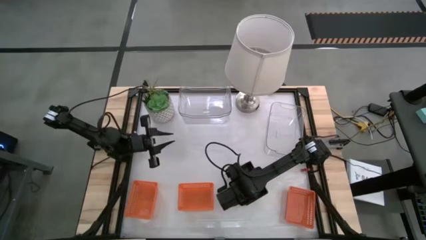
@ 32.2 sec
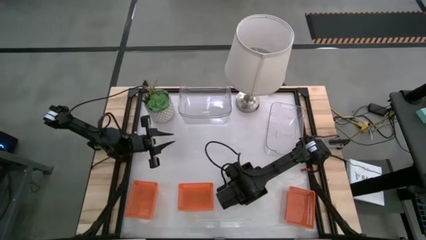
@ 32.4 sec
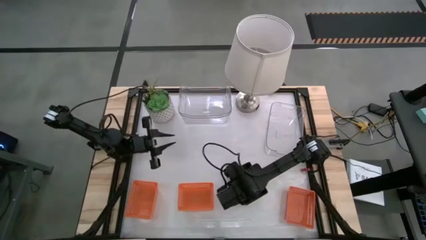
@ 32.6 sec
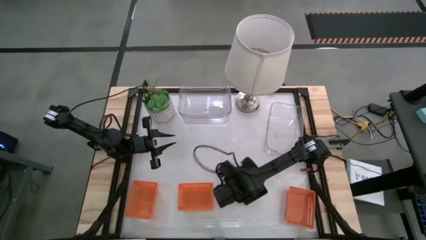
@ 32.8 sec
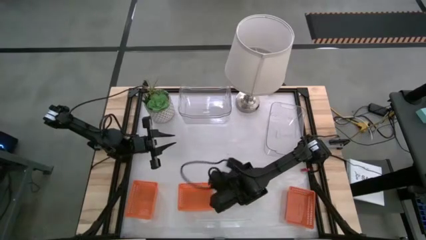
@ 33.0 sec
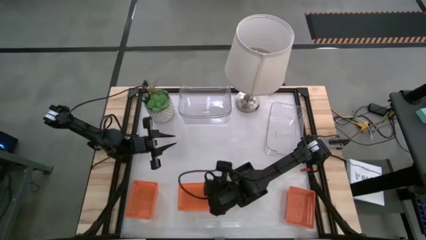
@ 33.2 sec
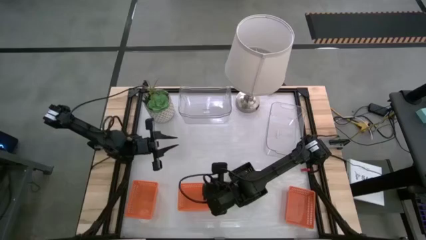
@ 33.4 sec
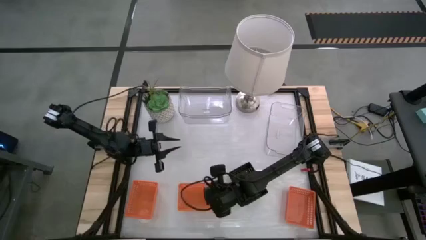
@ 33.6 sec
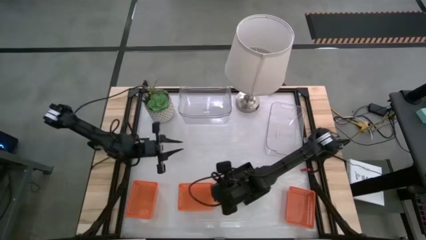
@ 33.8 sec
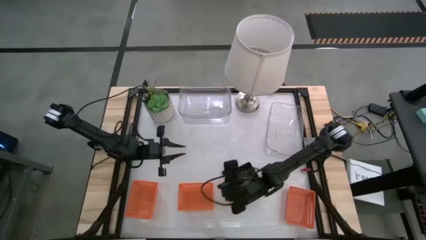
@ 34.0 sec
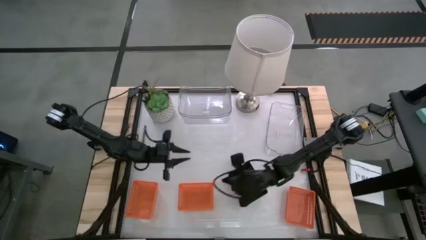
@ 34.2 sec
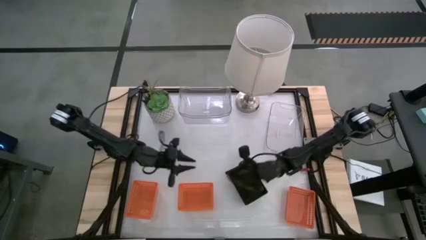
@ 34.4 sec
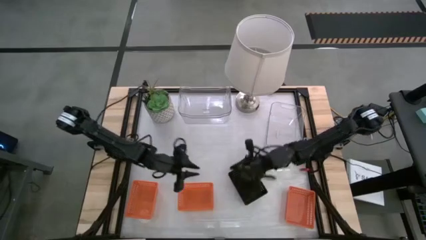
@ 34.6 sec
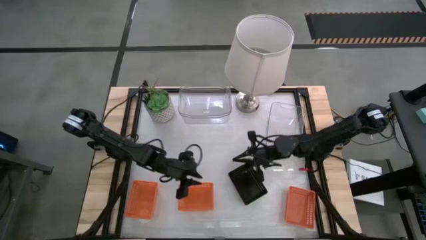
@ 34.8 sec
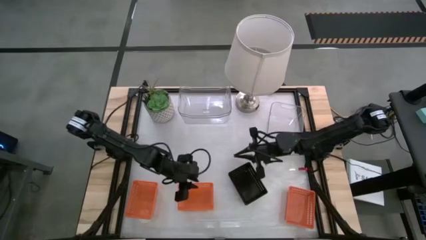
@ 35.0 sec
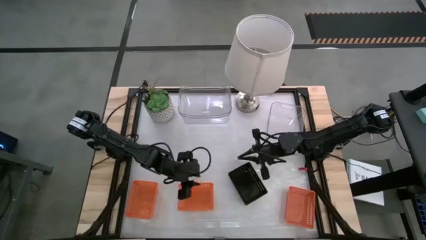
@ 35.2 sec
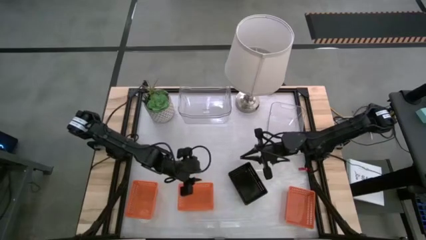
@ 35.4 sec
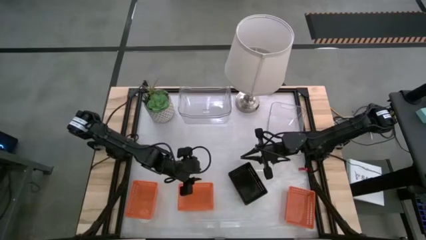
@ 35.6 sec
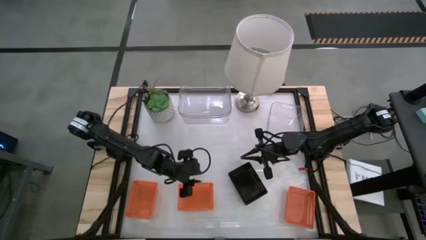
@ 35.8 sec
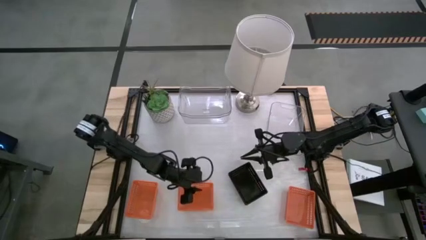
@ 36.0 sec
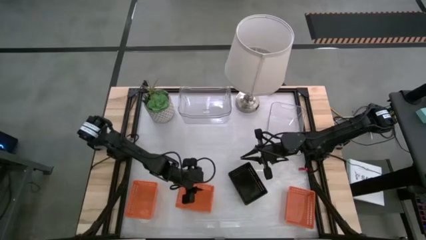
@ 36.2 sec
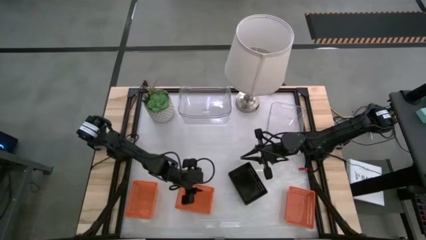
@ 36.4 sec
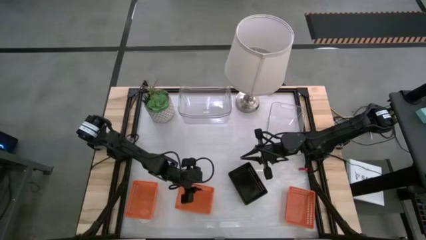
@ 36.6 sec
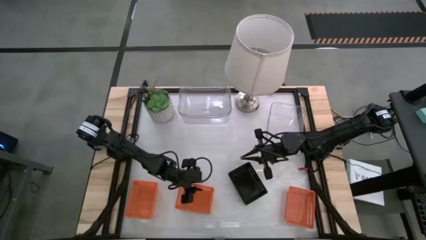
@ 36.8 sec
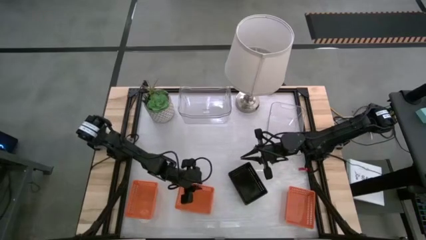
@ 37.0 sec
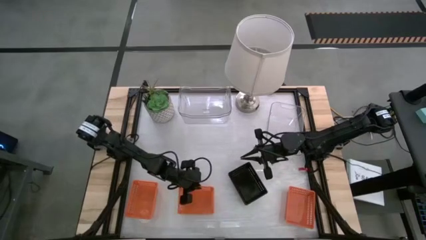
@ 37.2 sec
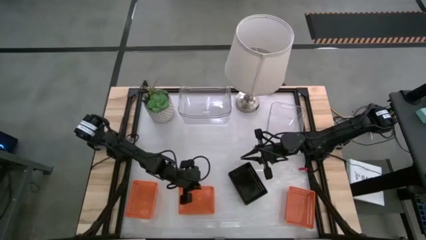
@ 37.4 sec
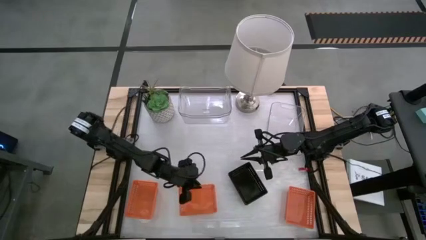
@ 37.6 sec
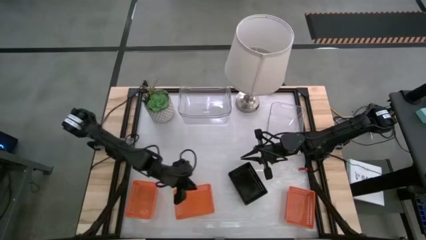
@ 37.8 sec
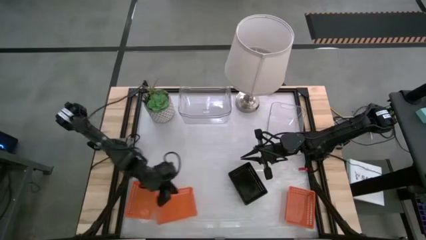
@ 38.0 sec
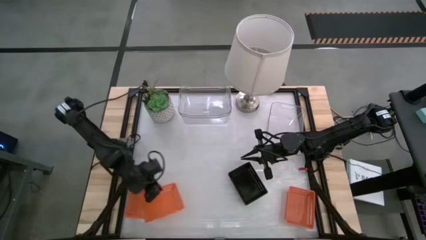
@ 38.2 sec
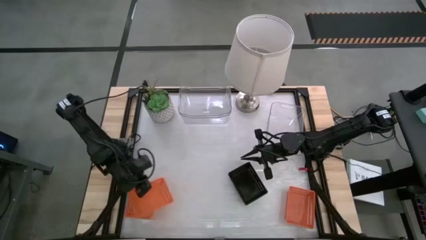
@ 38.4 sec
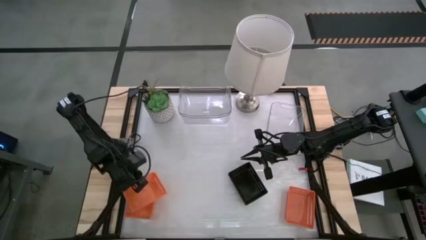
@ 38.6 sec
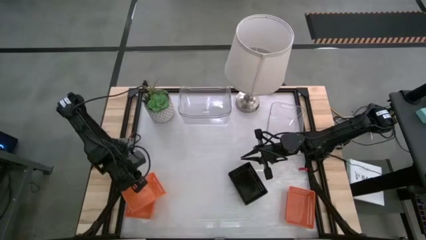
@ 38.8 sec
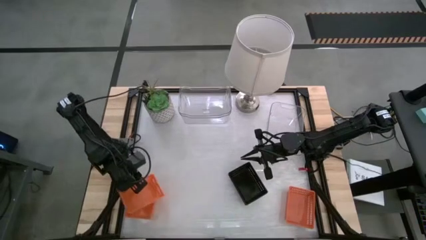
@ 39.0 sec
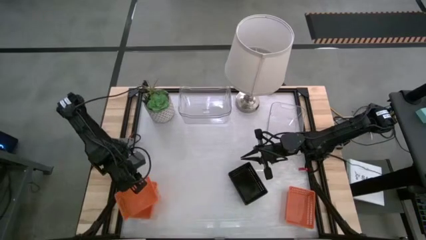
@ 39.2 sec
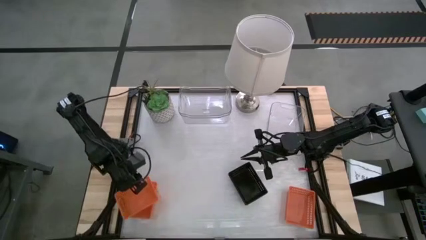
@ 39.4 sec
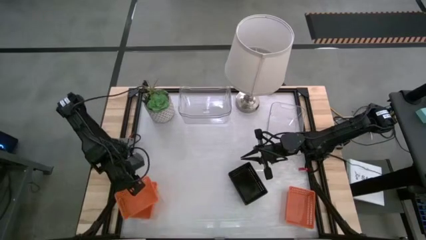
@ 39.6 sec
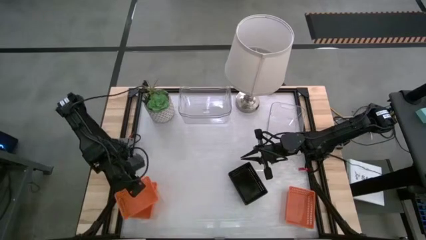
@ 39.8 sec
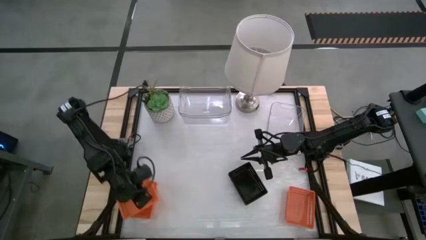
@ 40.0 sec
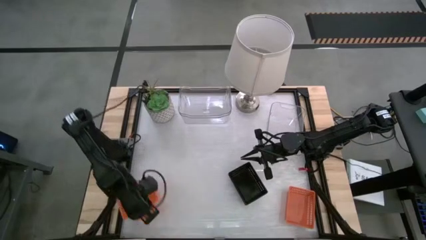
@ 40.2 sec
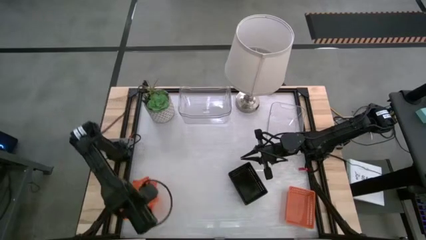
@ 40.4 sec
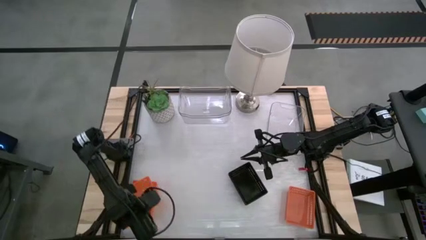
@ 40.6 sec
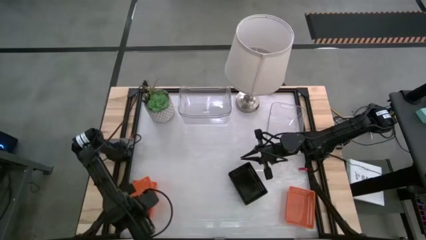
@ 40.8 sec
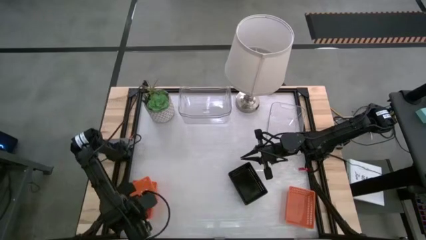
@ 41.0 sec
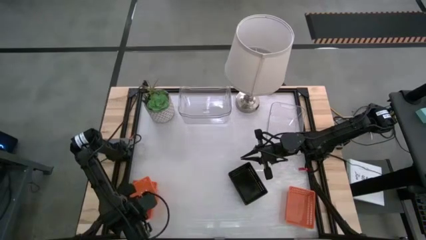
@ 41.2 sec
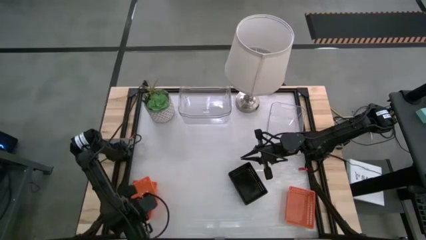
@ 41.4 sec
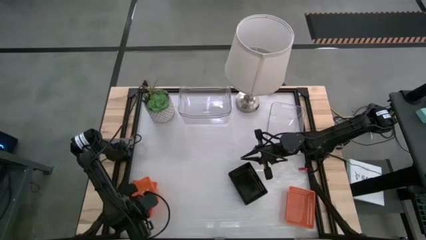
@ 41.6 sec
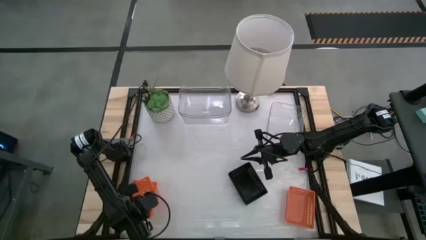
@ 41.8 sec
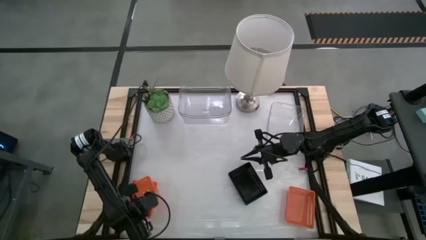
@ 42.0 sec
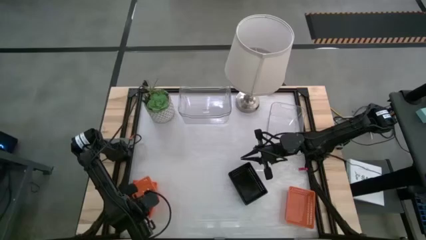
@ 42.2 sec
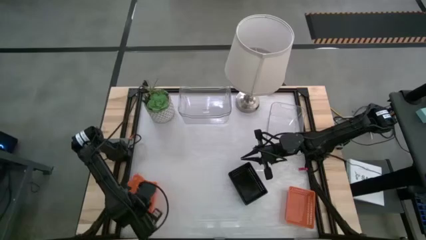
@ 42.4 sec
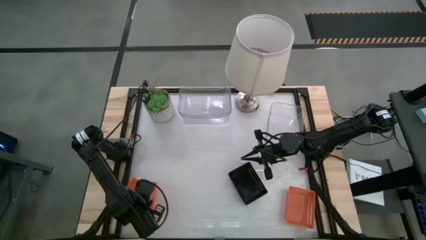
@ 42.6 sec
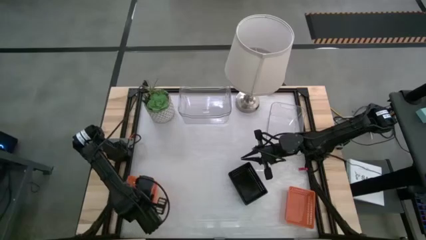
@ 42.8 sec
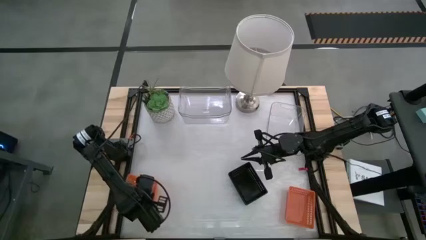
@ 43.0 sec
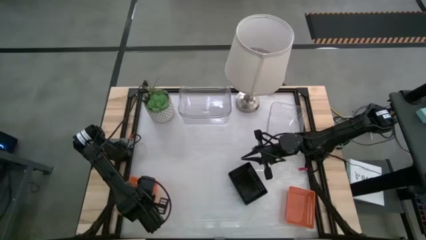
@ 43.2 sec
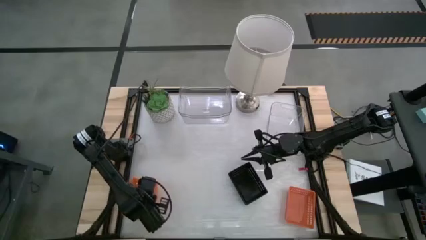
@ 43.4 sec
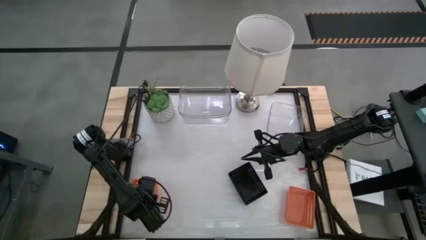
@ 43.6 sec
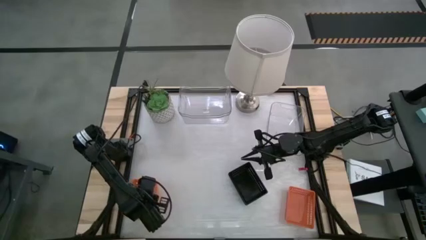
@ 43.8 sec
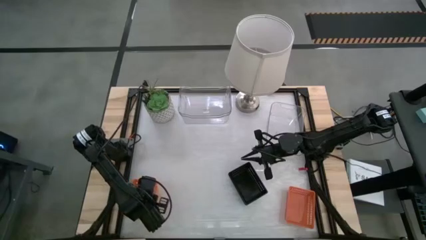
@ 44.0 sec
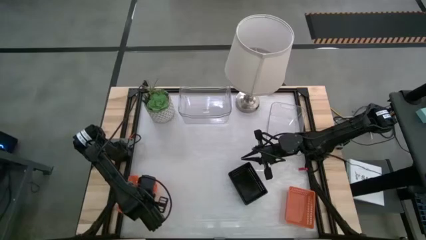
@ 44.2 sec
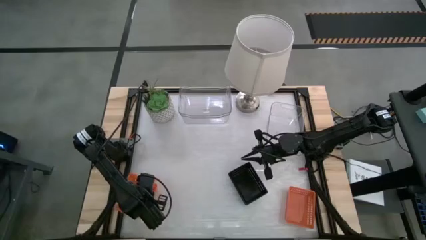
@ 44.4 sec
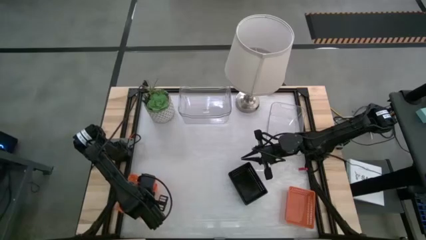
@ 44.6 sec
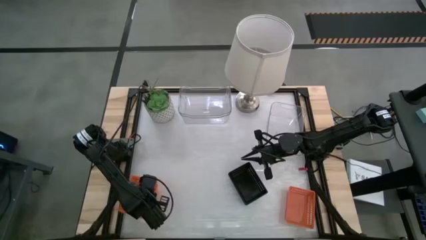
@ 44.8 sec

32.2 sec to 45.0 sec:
Stack the middle orange bin on the left orange bin
